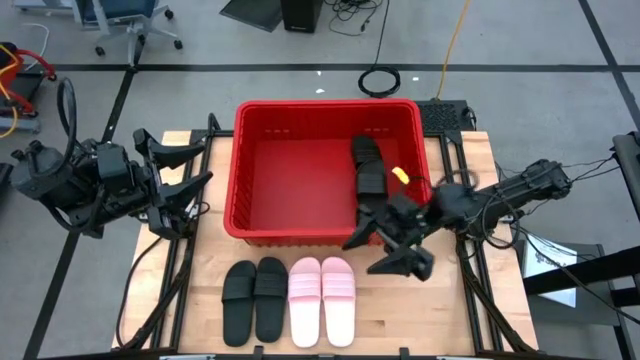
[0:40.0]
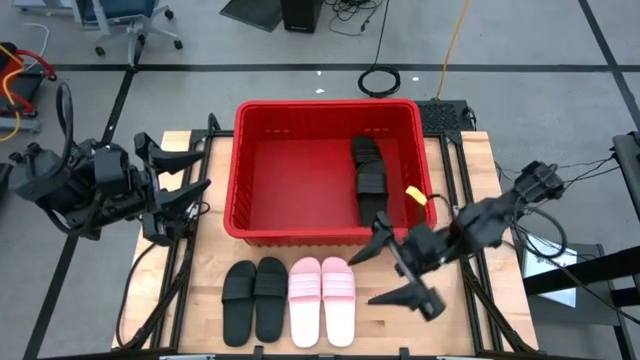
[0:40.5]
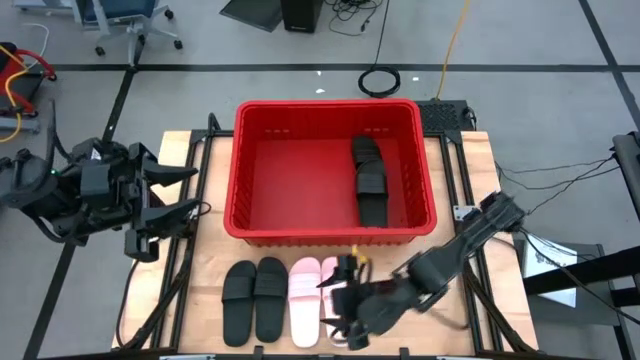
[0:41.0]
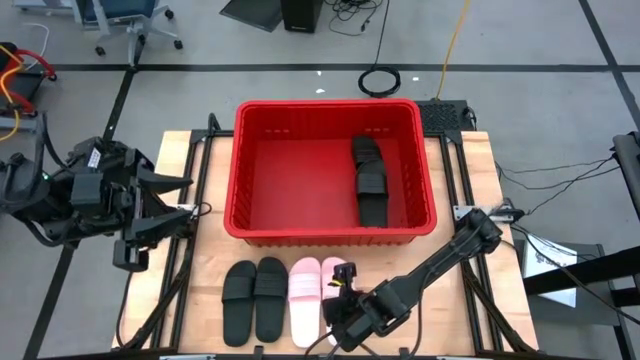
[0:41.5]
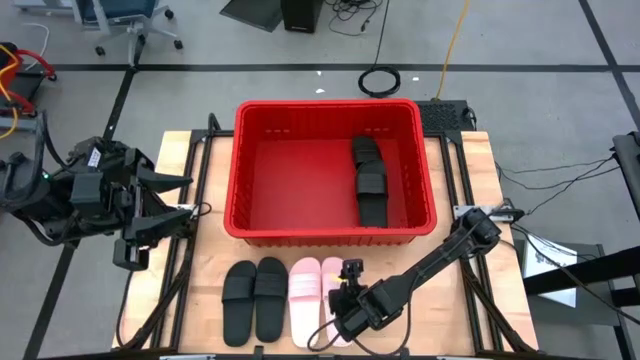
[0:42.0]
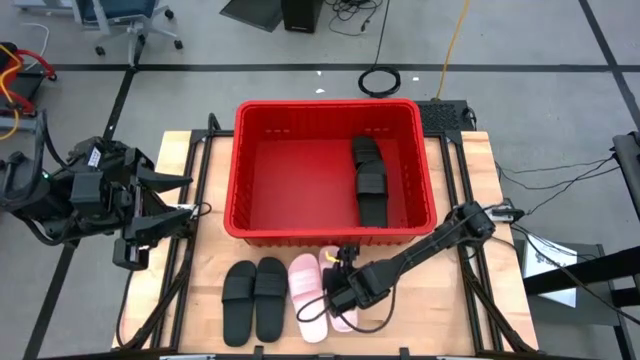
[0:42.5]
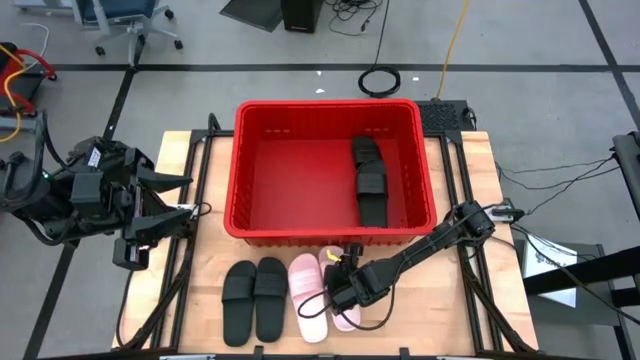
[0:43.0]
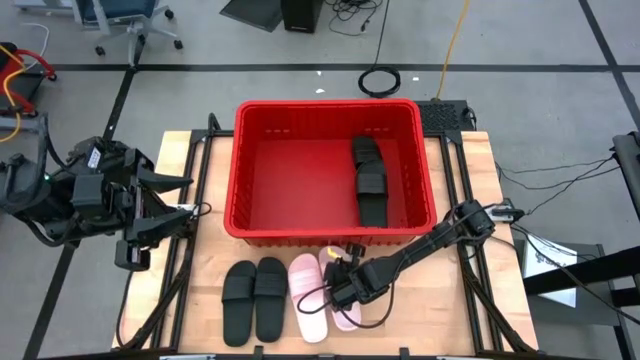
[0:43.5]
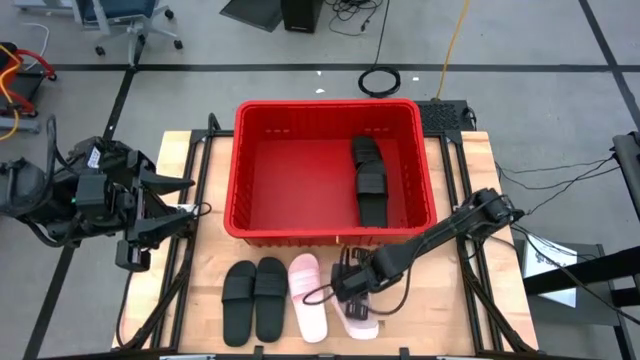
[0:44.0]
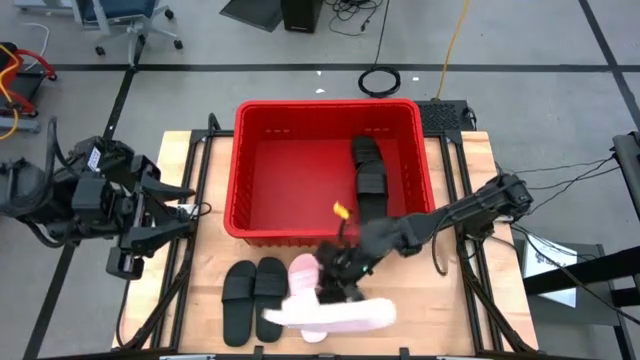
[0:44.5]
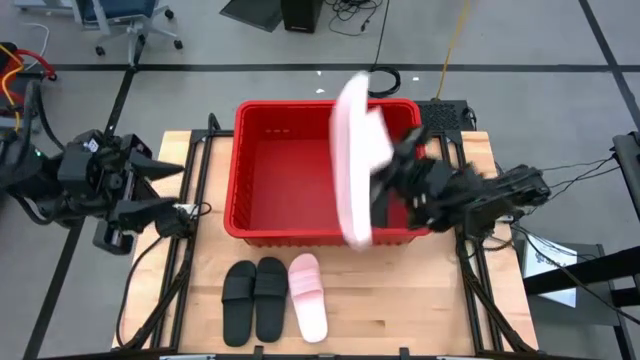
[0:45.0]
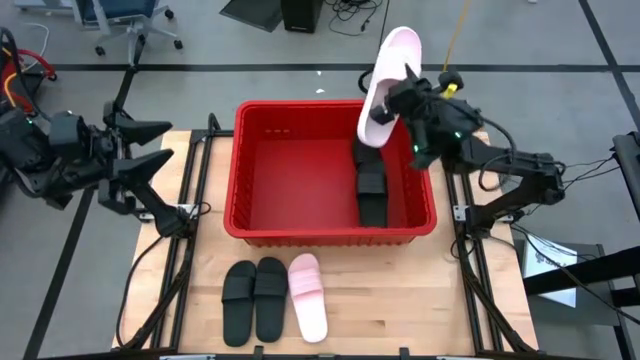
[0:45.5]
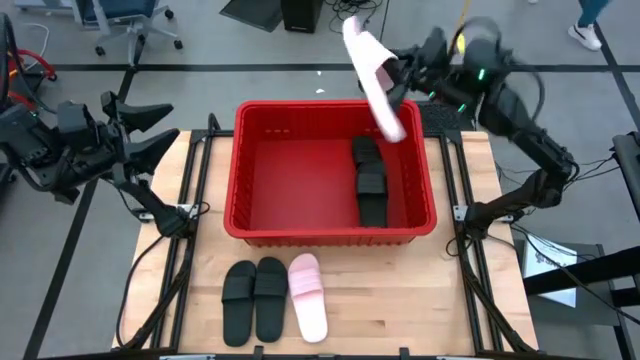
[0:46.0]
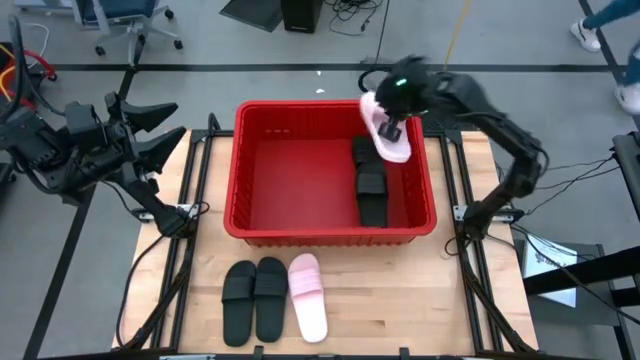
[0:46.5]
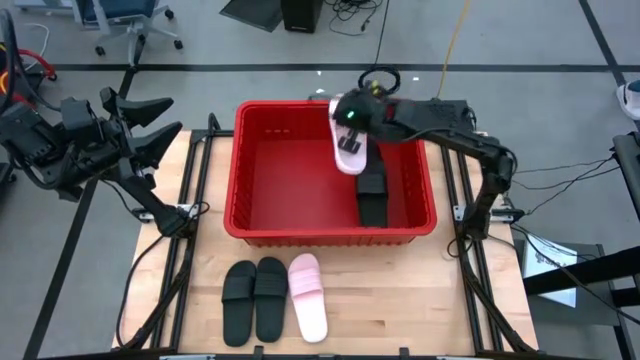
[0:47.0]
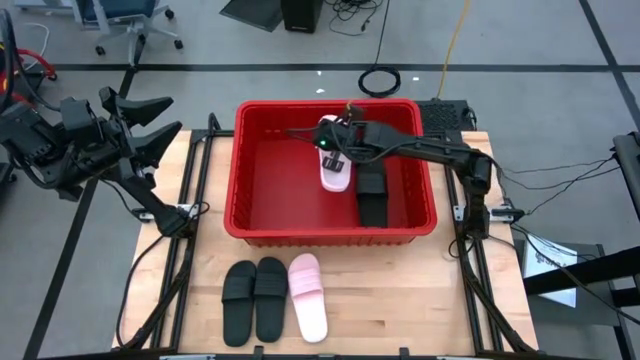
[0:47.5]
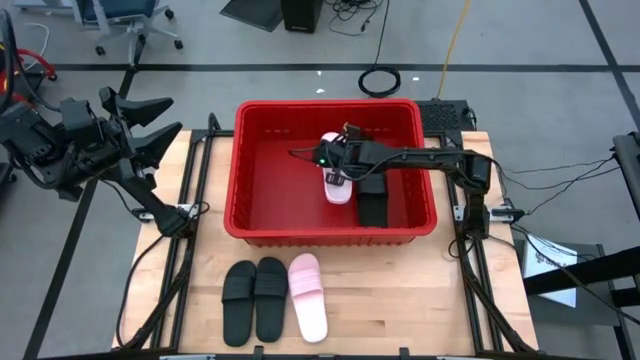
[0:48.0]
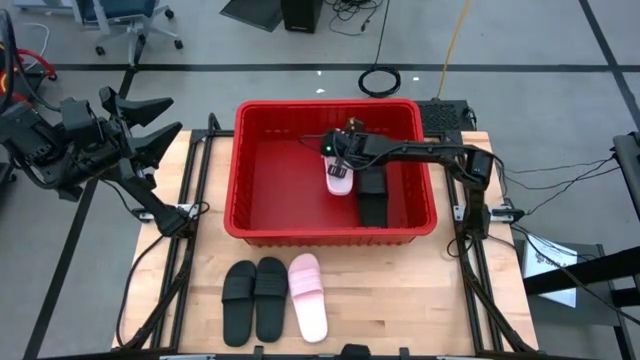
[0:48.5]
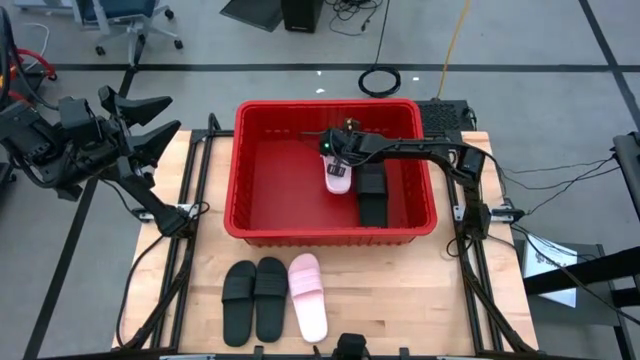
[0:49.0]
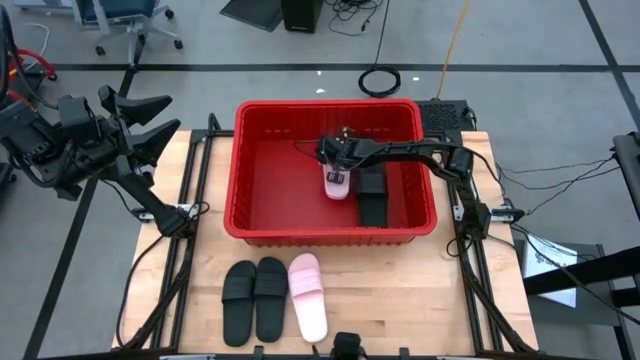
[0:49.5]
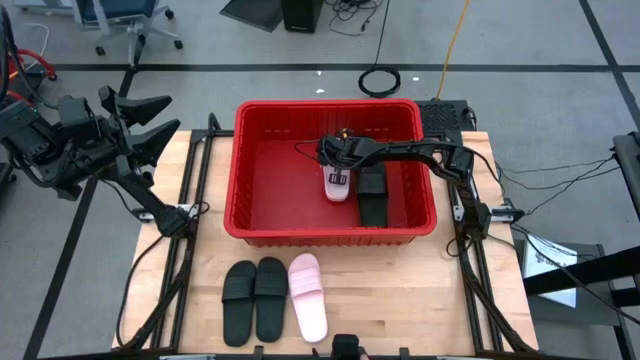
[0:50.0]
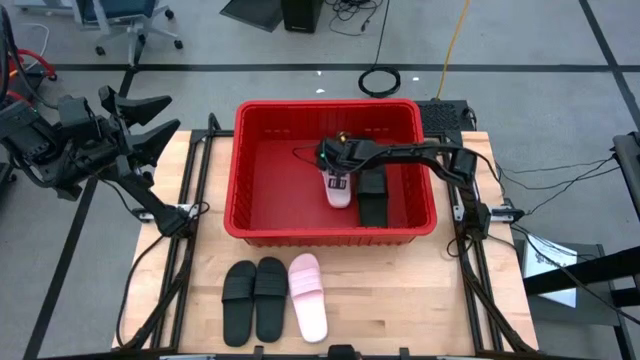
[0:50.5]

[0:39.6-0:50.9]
Task: Pick and place slides into bin
Put the pink slipper into the red container

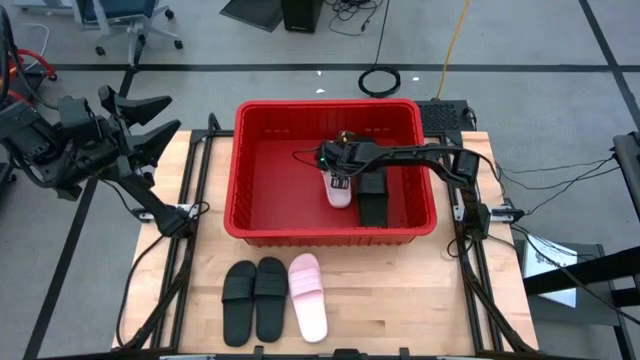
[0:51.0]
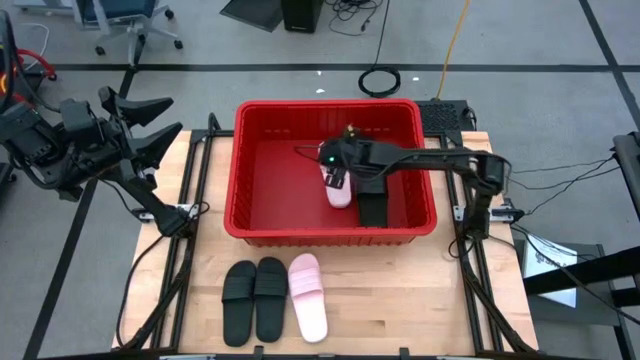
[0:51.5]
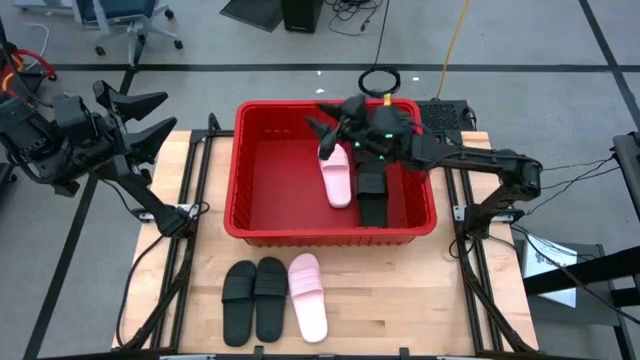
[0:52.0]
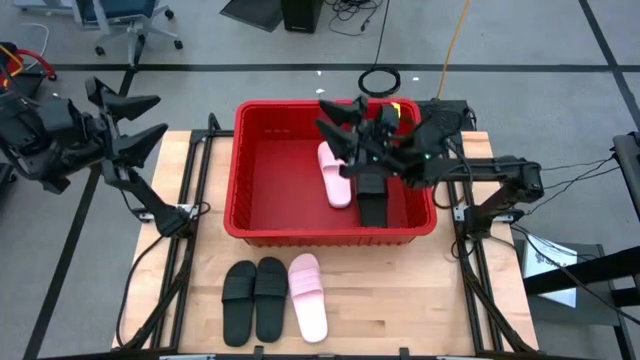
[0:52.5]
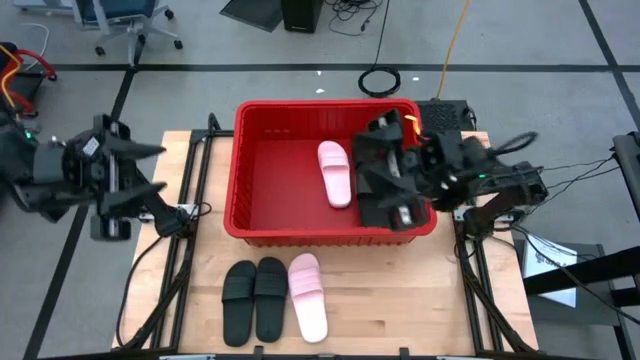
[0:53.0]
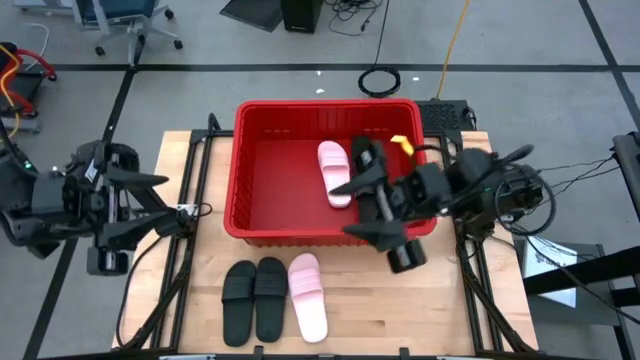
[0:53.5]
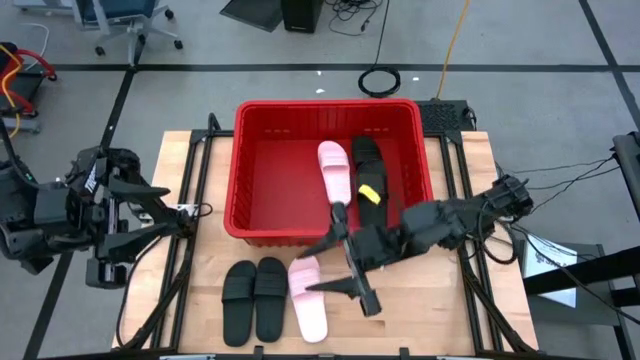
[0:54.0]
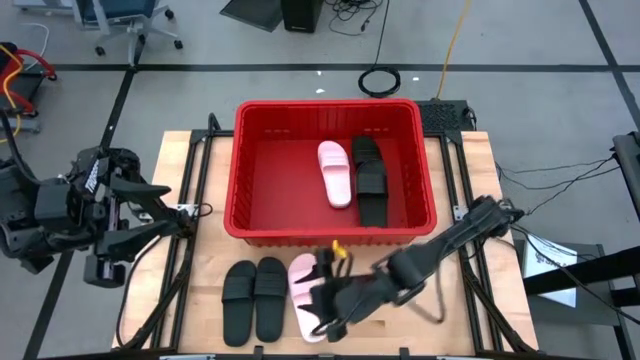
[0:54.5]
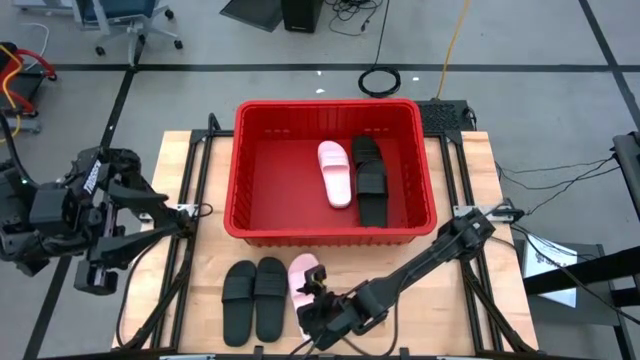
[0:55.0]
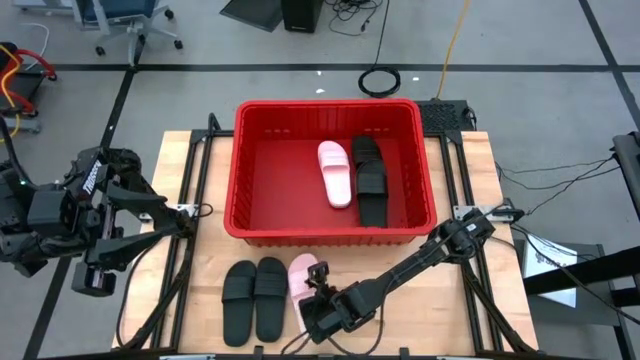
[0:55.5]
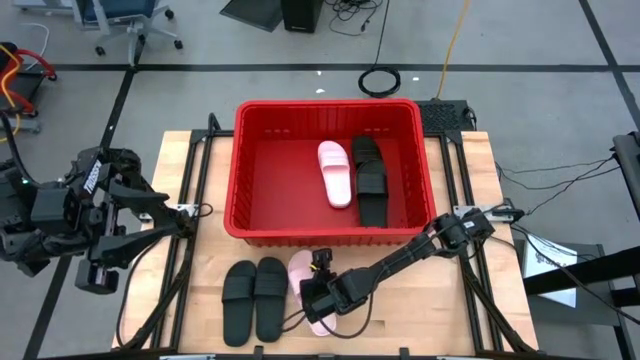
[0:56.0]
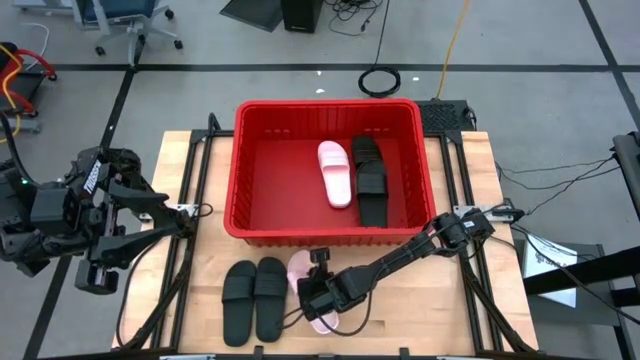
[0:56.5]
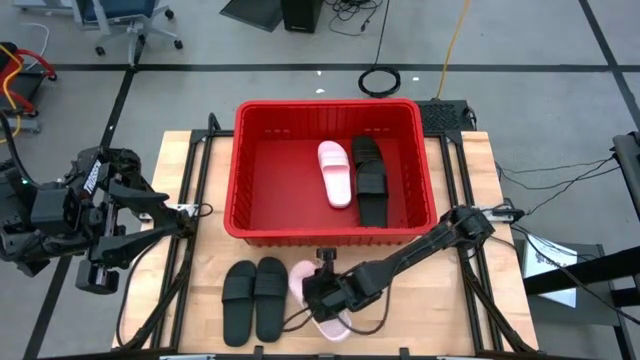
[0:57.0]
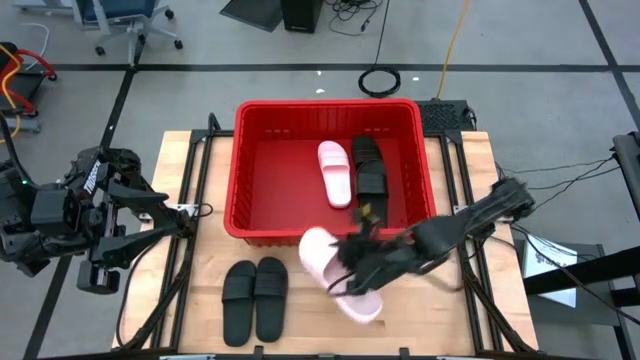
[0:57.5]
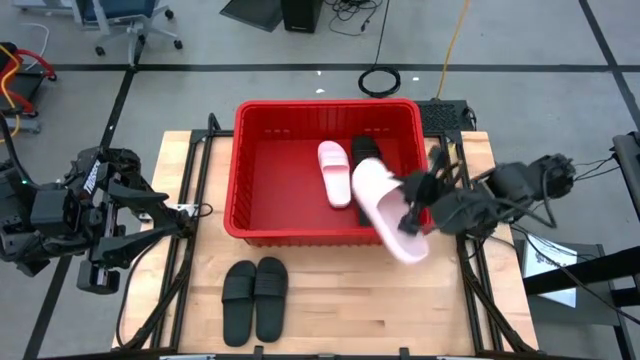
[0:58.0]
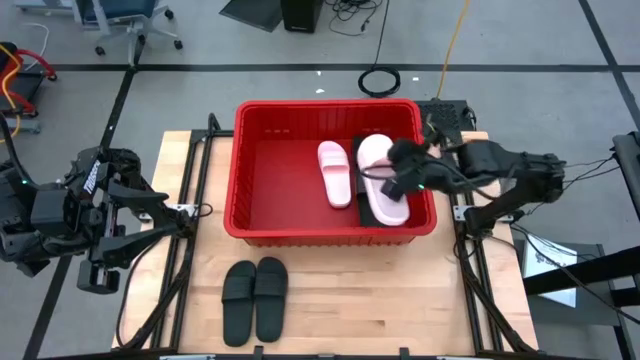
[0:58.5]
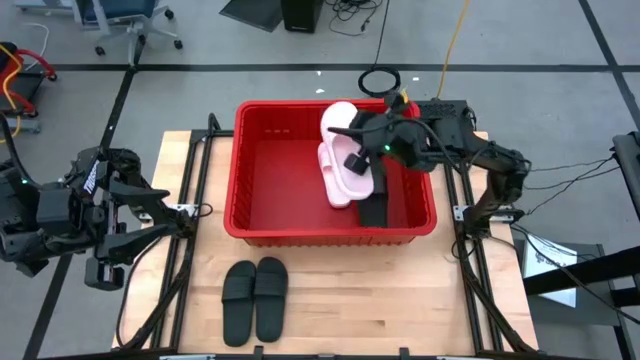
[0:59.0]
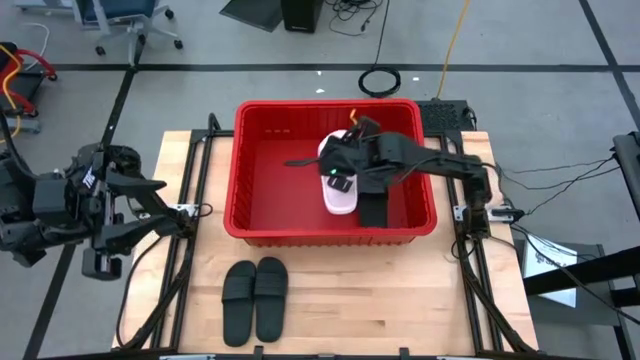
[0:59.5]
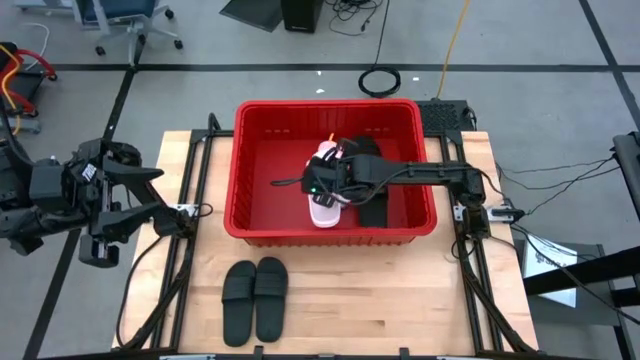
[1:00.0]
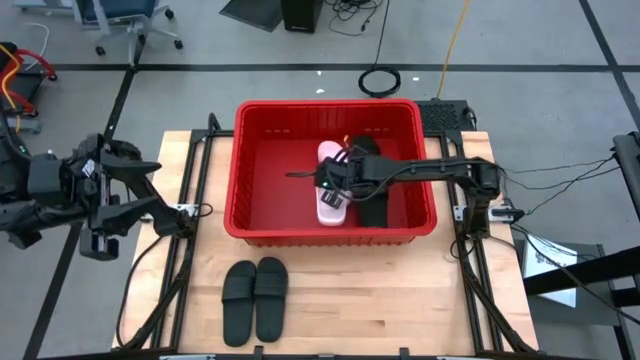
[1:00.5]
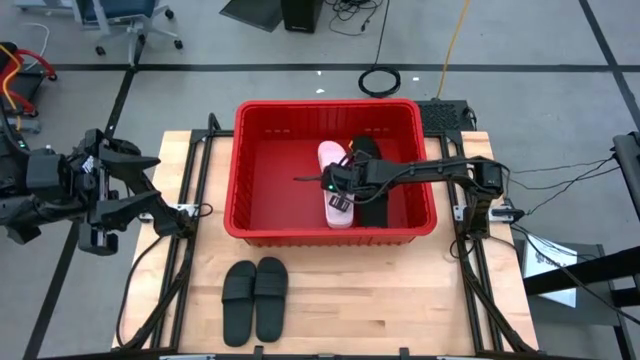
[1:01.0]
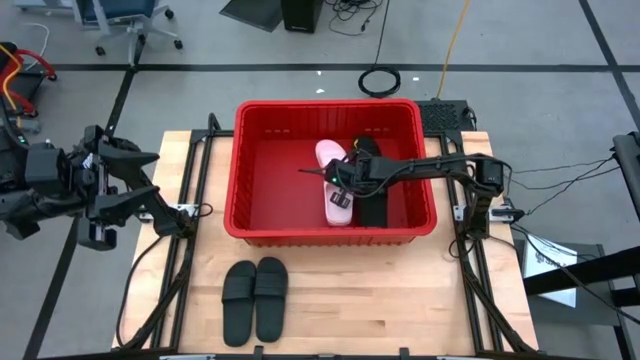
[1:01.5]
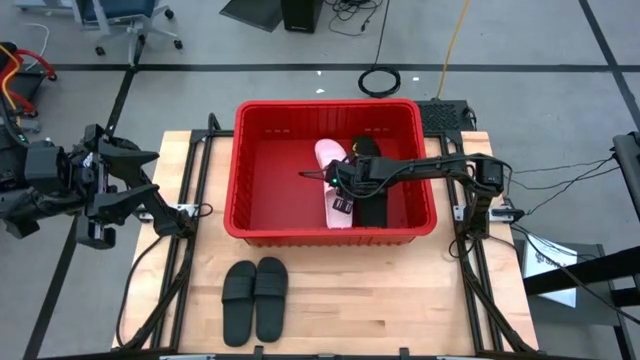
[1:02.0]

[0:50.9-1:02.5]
Put the pink slipper into the red container
